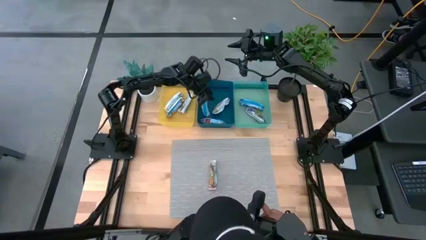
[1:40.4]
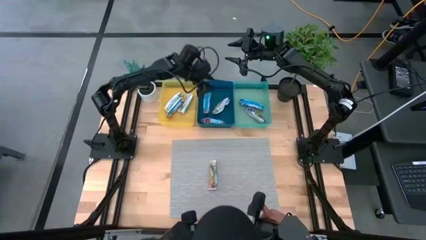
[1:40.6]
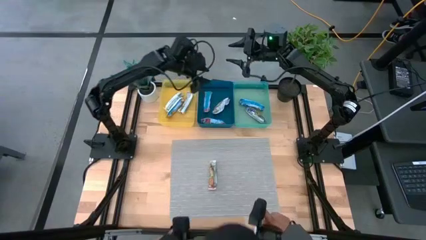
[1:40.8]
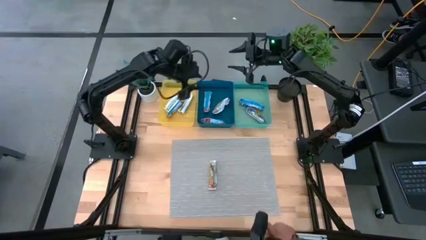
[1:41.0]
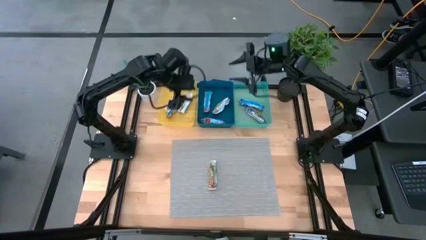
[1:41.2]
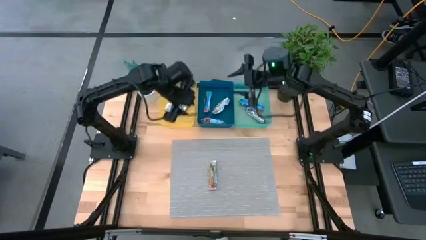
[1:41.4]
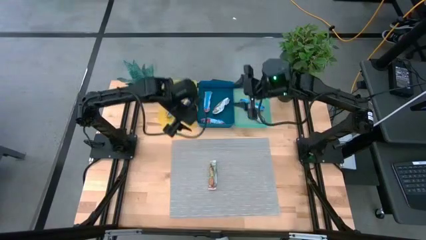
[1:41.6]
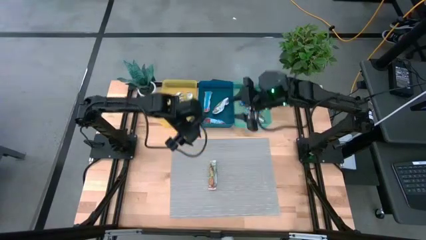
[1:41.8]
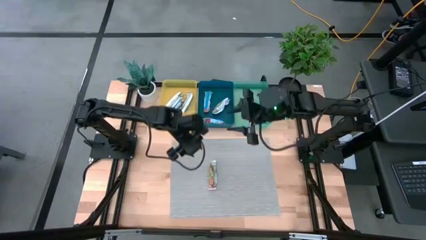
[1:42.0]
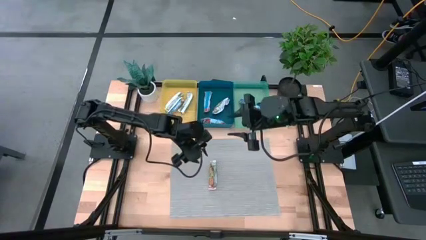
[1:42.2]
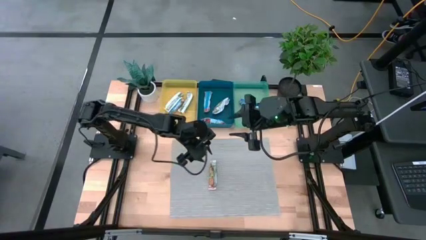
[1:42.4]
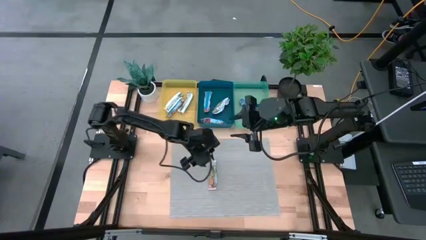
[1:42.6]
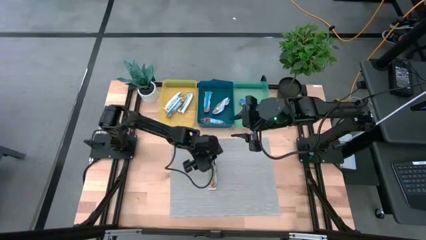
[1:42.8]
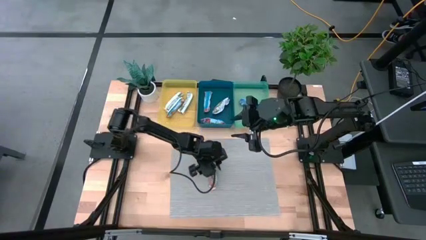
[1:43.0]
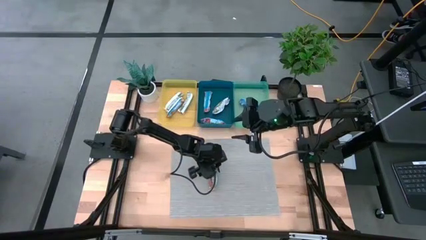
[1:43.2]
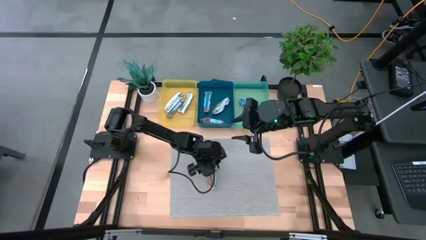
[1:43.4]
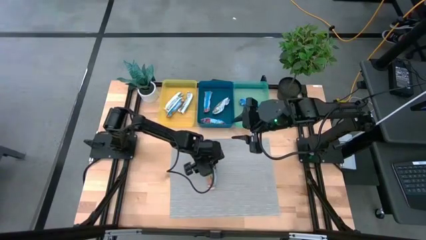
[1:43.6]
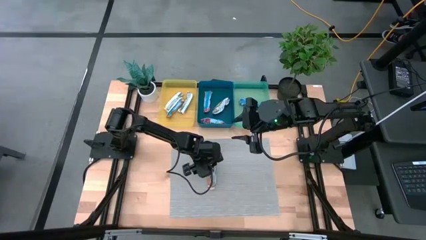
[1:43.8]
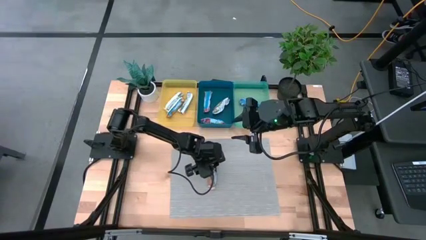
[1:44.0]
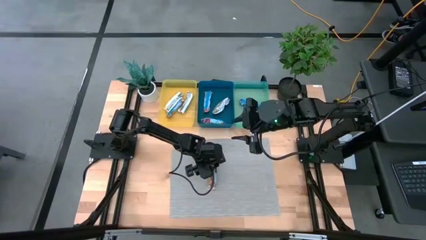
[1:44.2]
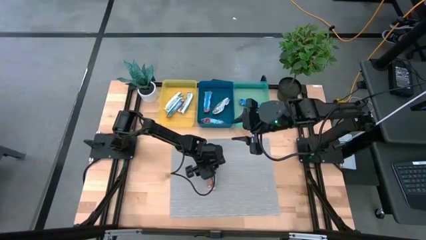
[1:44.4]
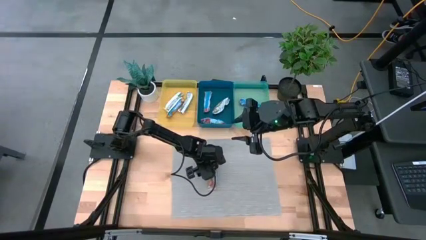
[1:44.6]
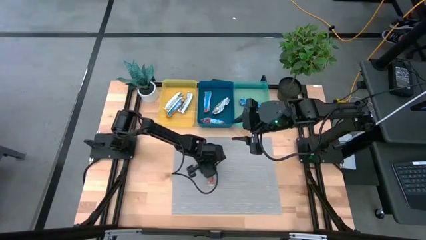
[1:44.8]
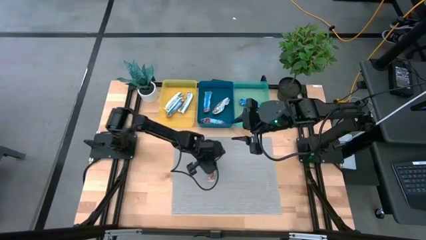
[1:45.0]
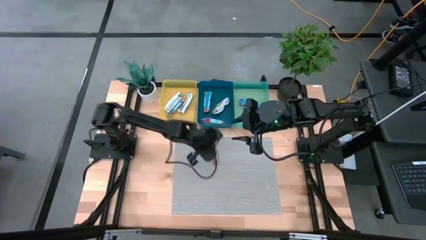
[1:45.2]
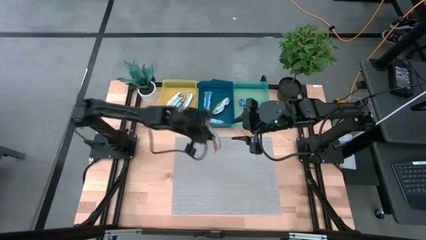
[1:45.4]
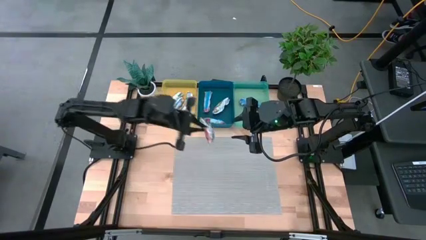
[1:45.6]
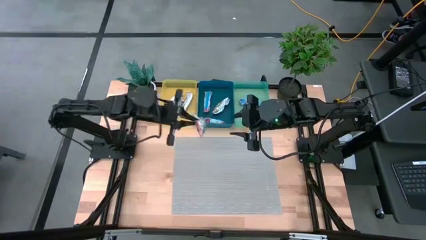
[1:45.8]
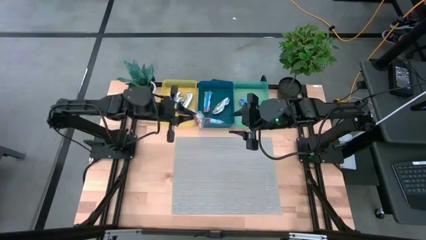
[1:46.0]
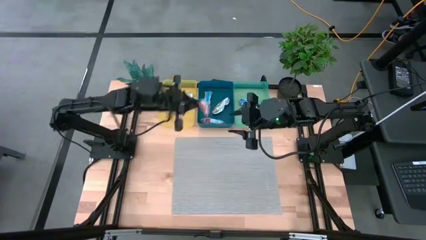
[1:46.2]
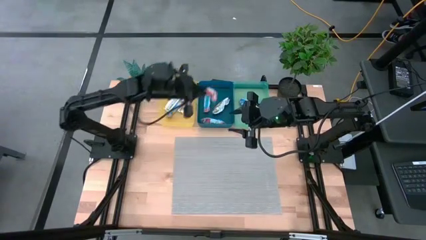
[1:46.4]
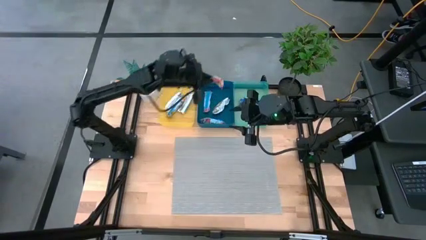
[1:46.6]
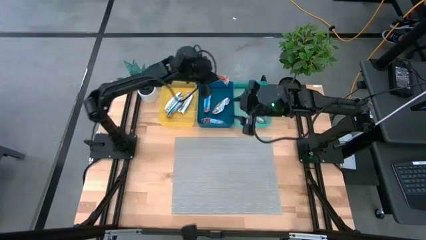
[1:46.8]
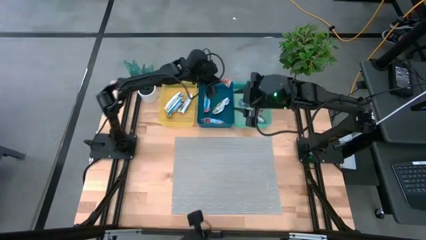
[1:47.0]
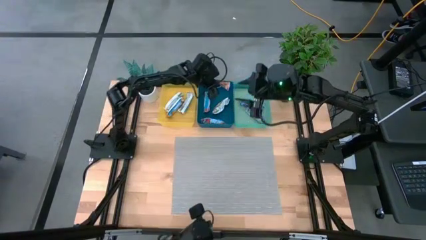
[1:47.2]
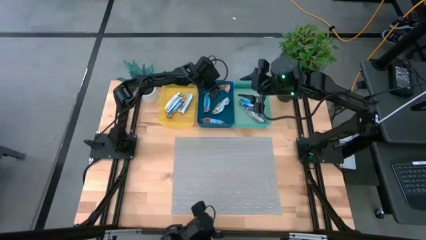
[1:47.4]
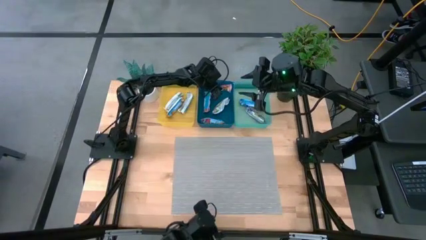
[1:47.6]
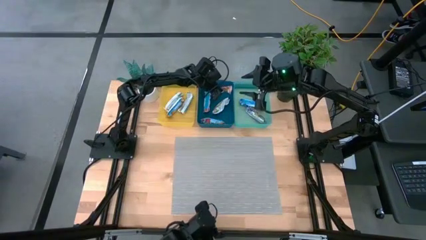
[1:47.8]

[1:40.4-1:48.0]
Task: Pick and place Granola Bars by type
Put the red granola bar into the blue bin

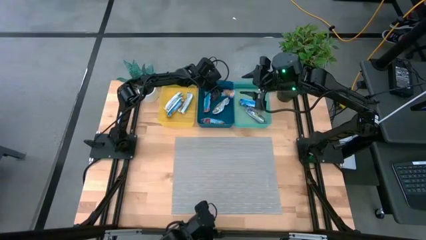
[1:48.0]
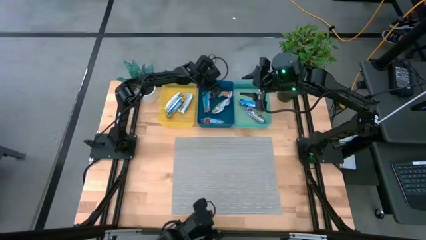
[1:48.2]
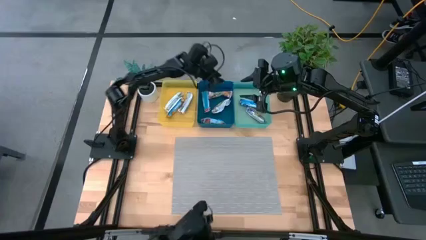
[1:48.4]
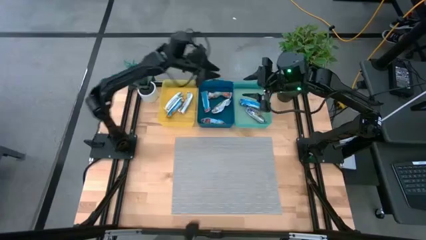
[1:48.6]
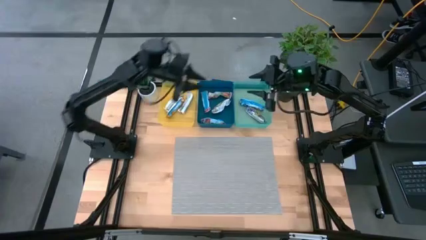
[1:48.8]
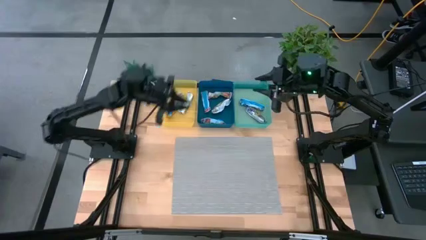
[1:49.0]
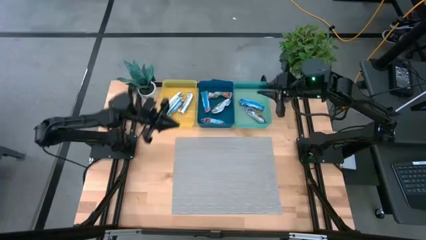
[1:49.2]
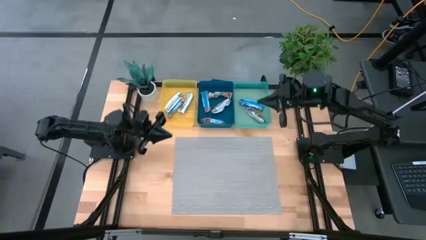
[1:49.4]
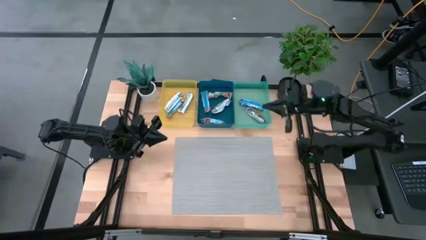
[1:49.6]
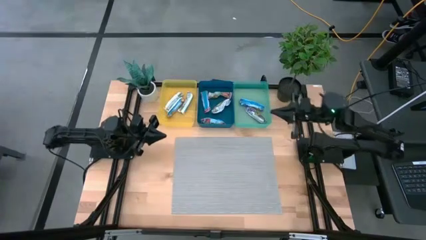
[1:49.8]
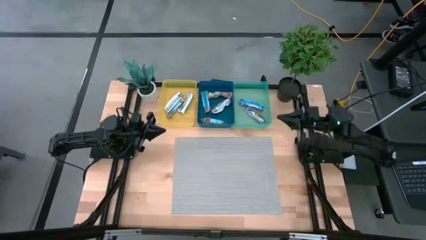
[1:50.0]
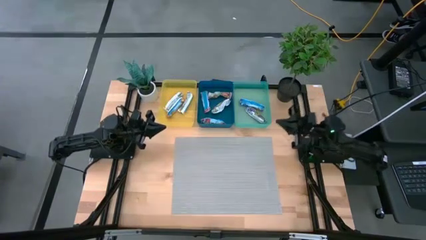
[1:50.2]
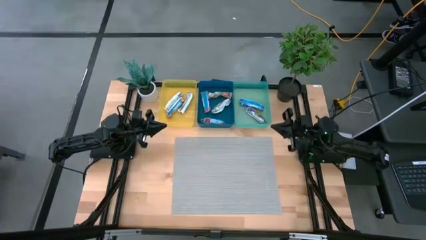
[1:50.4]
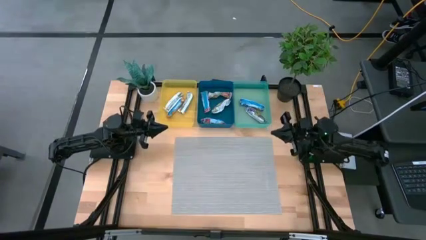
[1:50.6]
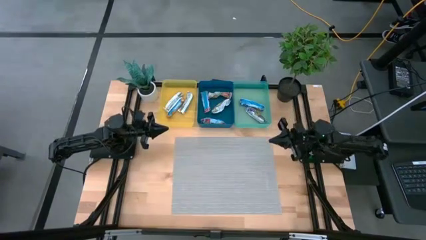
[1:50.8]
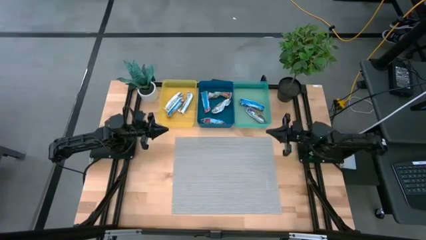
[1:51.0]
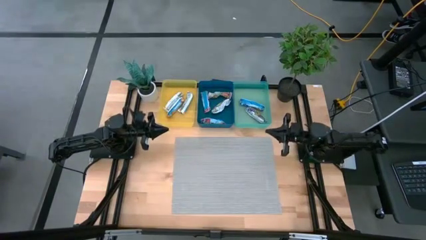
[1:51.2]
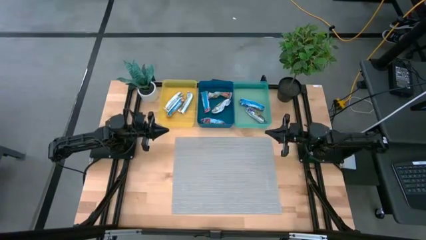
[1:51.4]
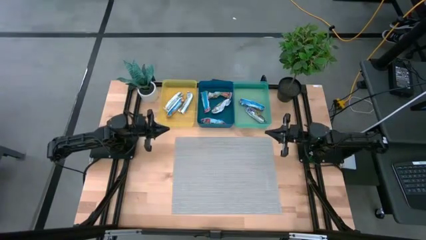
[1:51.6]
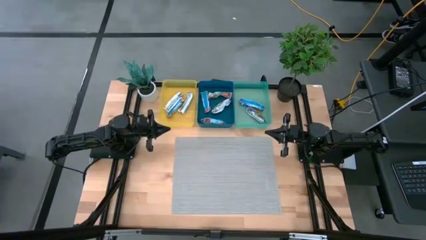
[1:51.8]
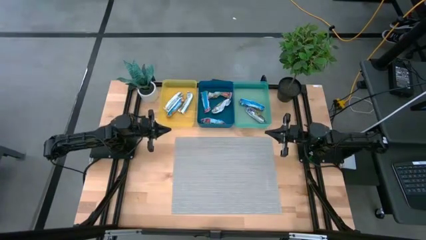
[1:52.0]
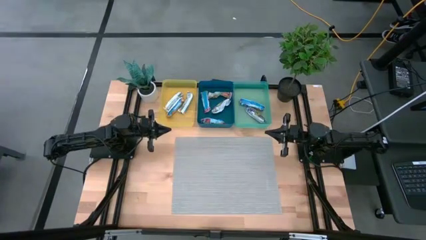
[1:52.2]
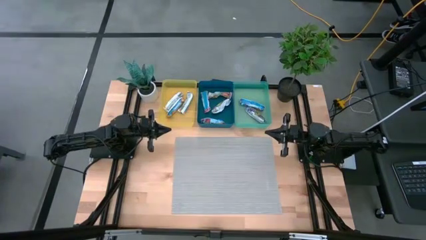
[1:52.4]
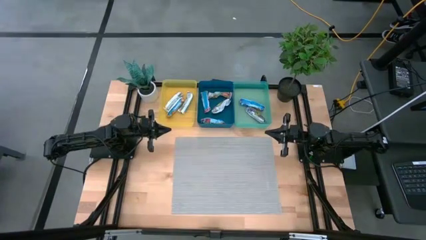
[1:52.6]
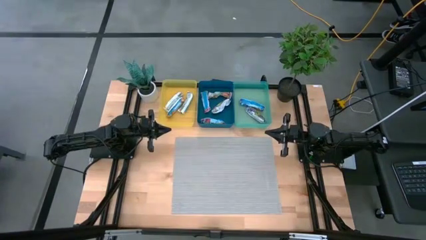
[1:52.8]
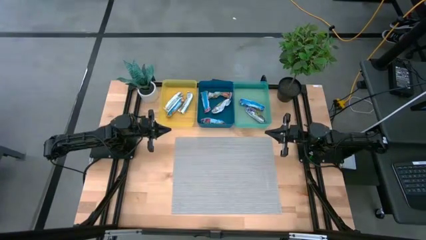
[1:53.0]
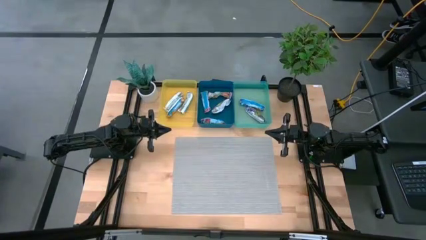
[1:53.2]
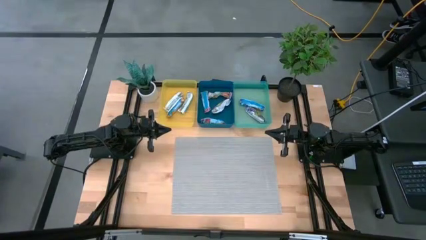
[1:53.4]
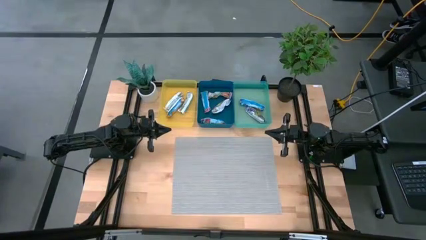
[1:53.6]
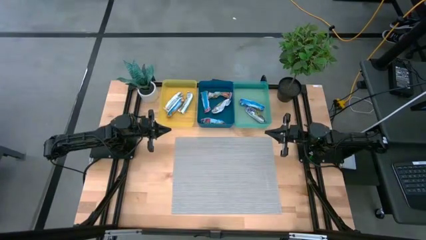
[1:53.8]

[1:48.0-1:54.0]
Return to Home Position
